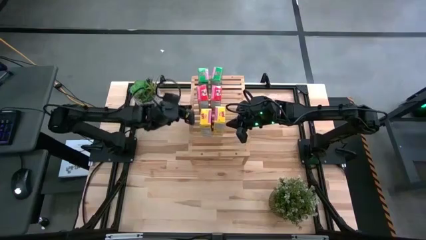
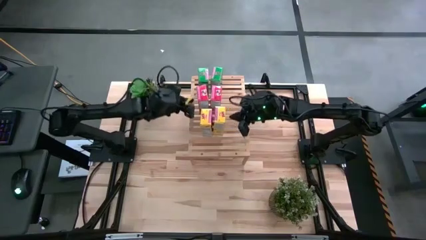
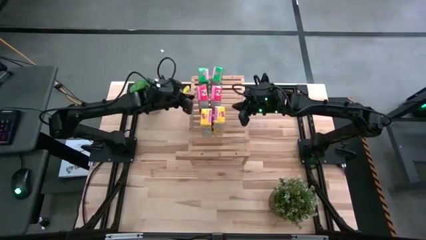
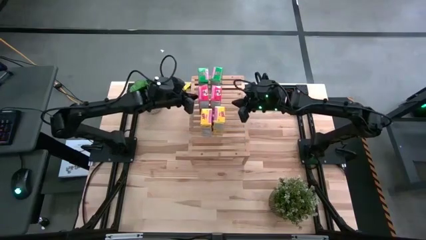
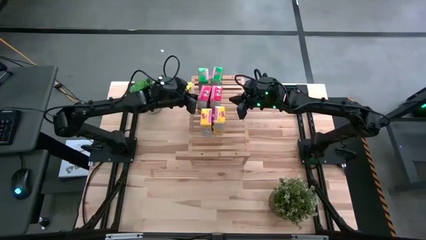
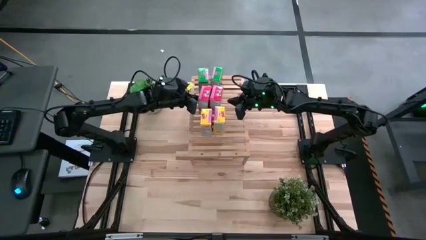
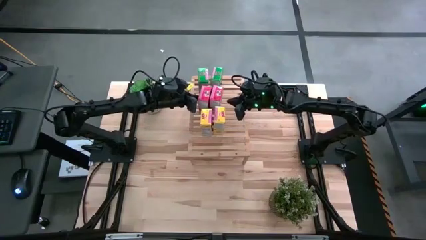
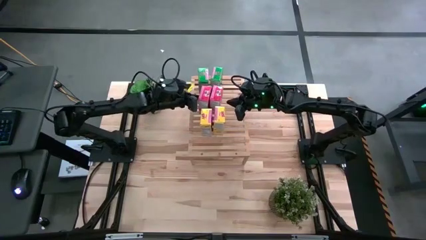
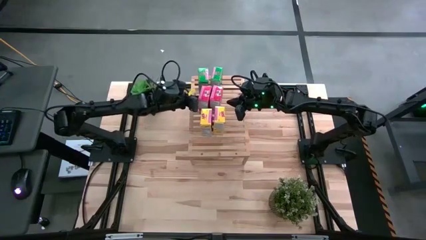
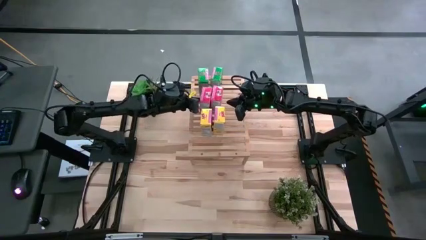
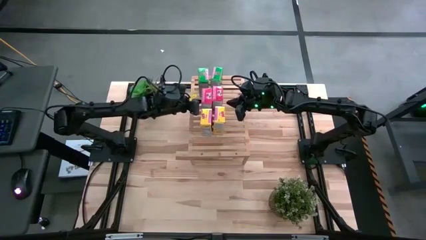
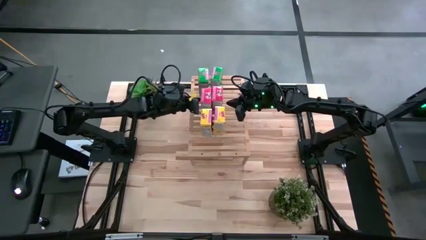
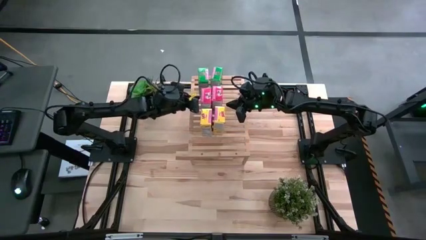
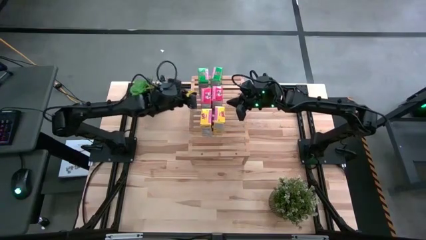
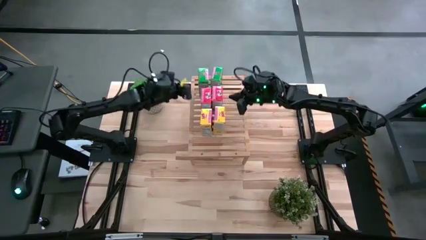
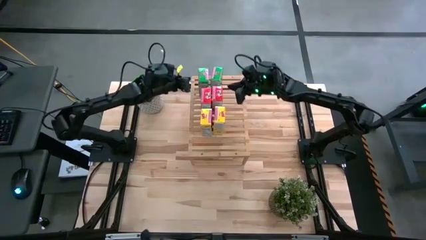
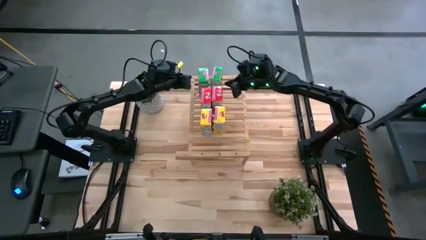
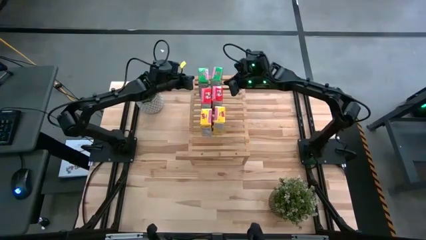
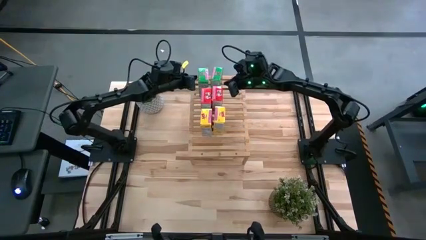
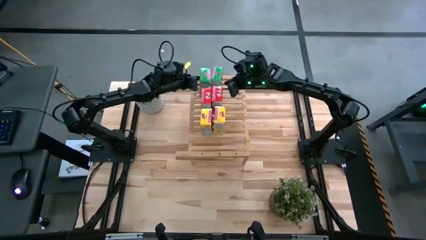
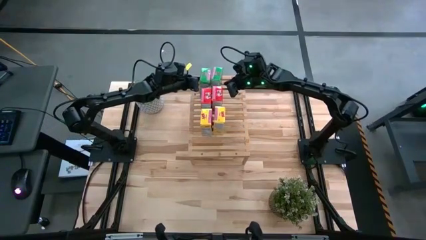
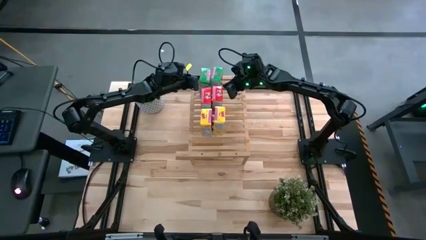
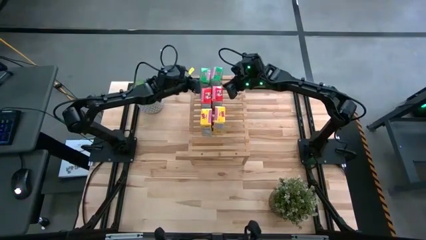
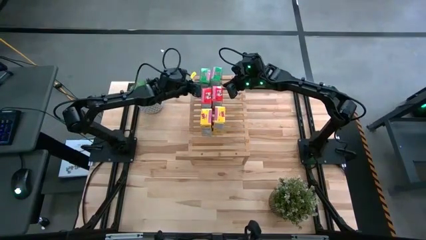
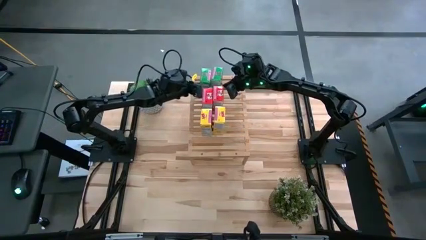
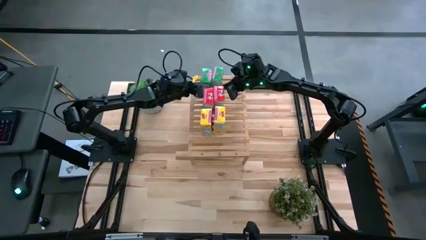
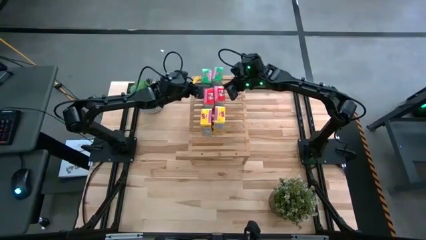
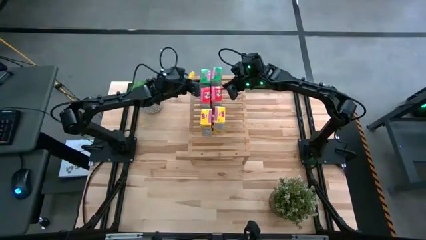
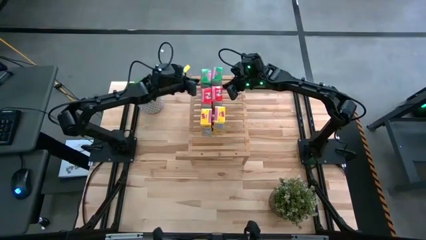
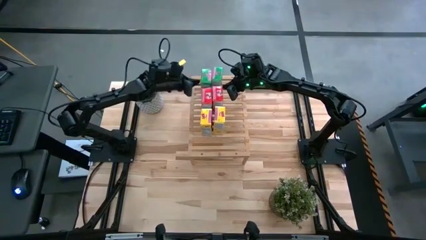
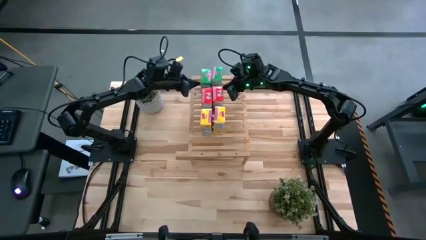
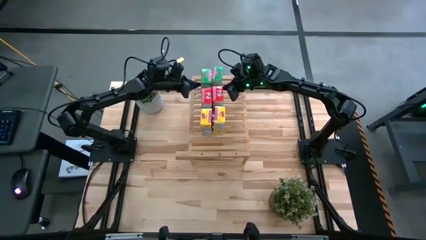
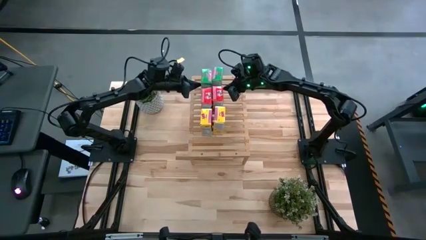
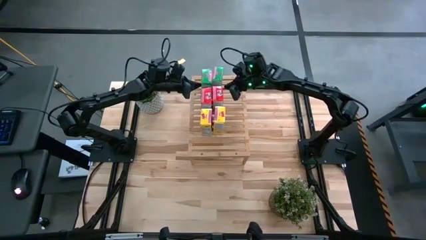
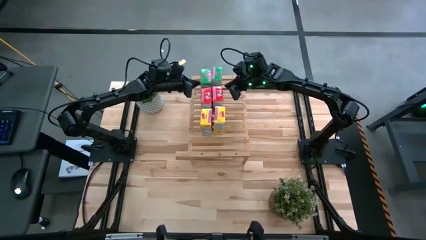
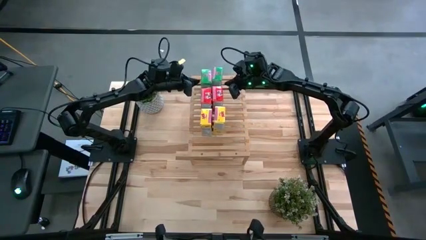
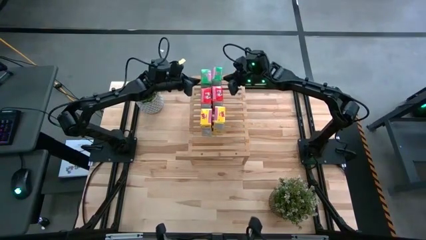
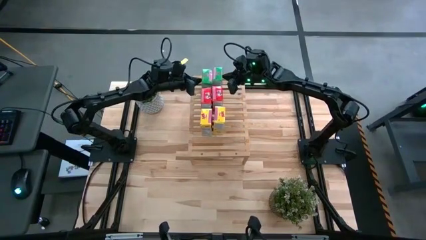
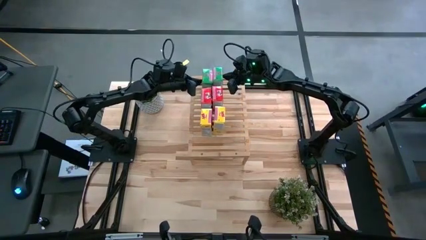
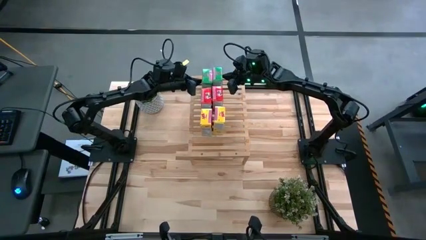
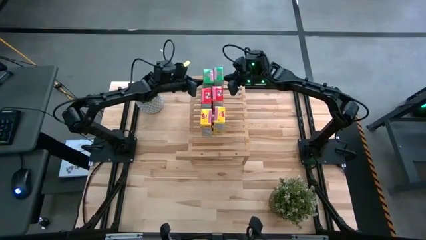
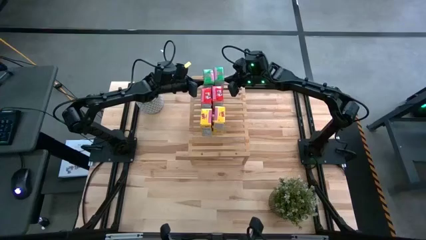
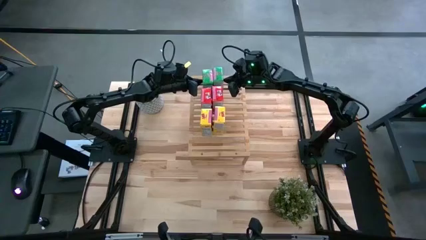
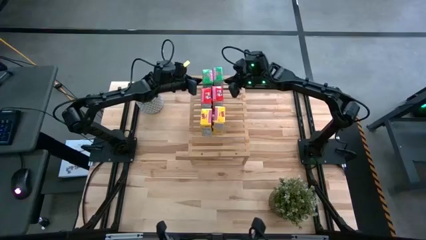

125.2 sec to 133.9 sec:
Task: Stack cereal on shelf
Adjust the cereal boxes on the shelf

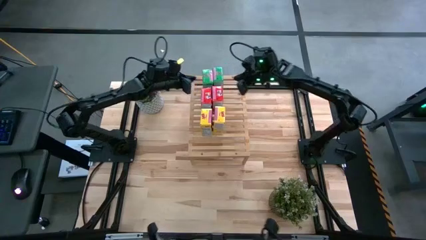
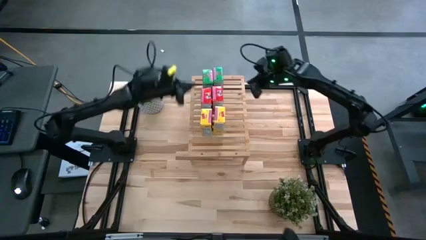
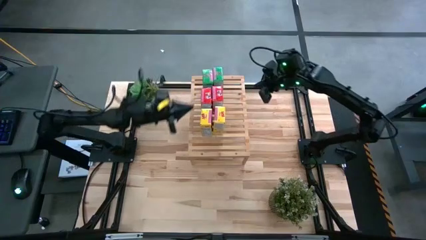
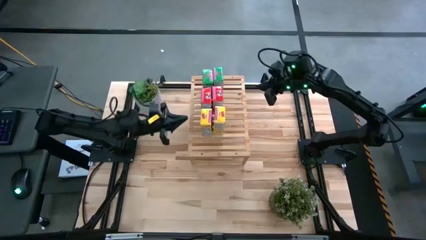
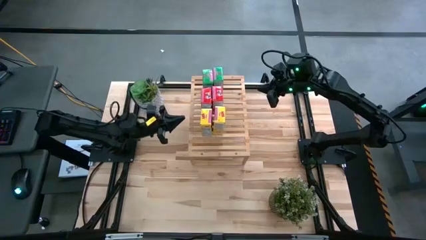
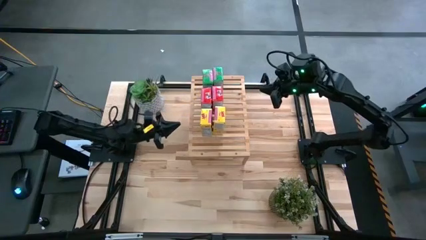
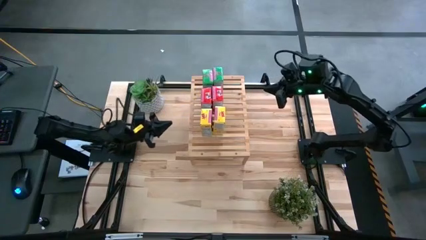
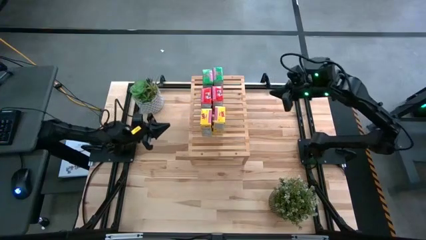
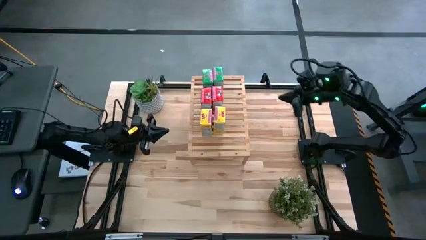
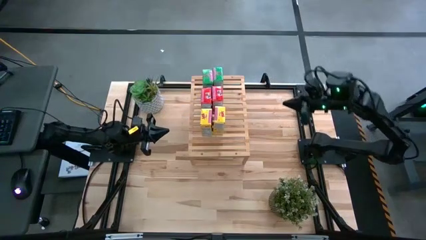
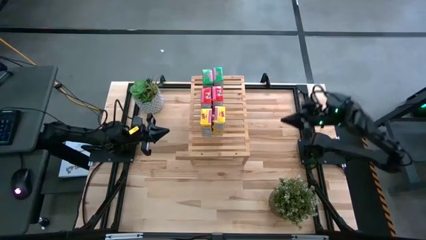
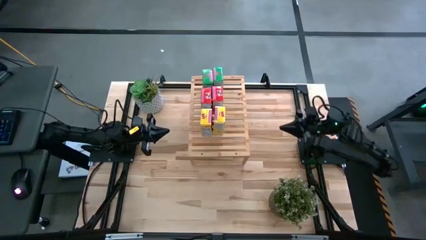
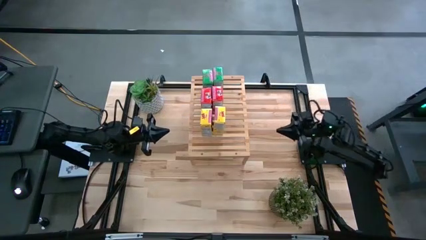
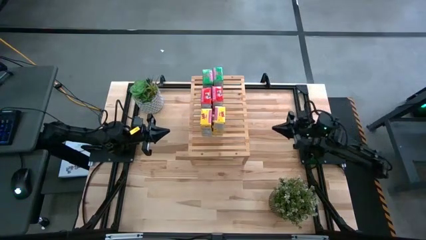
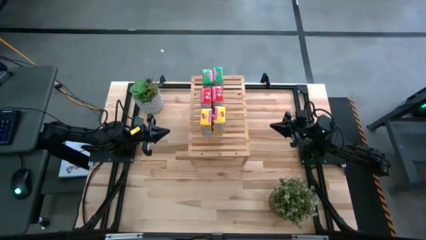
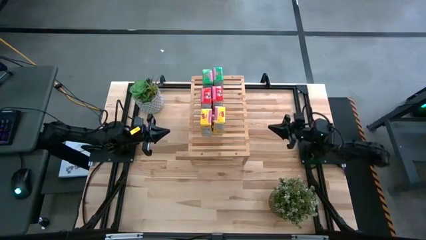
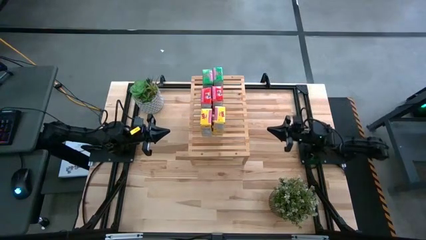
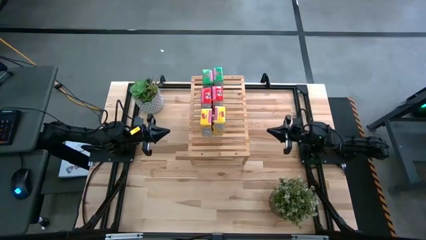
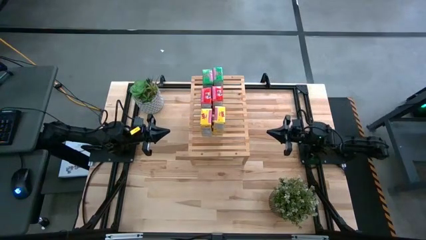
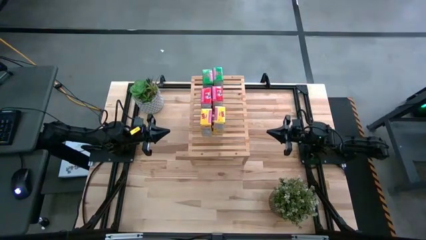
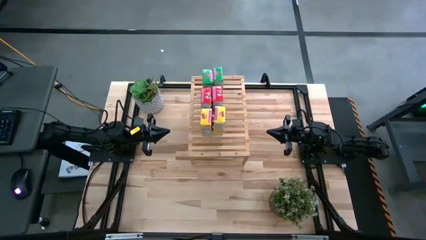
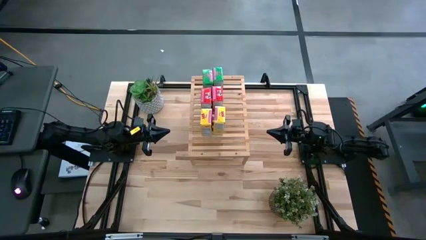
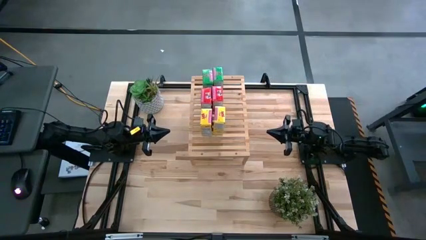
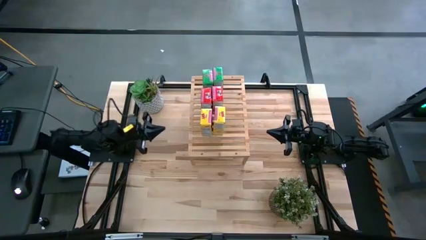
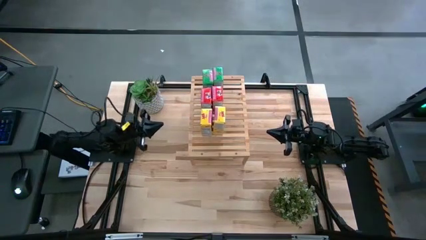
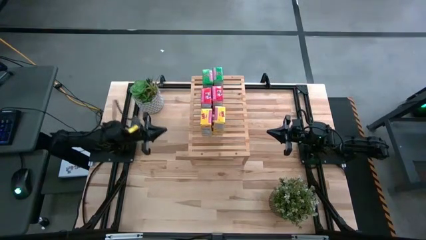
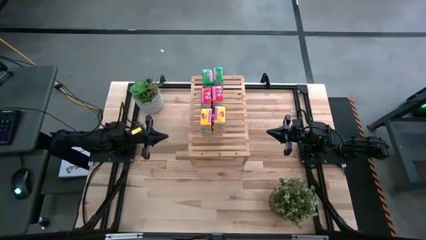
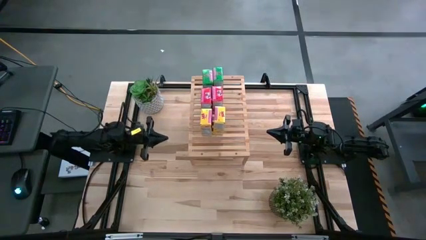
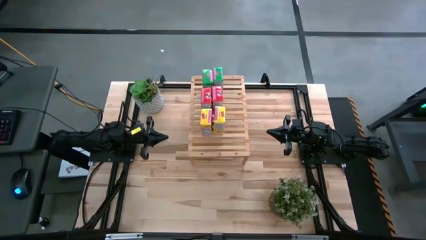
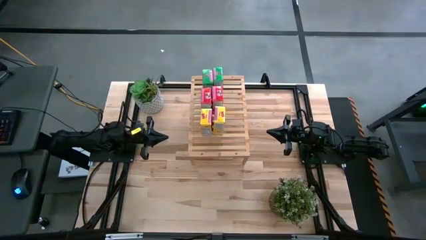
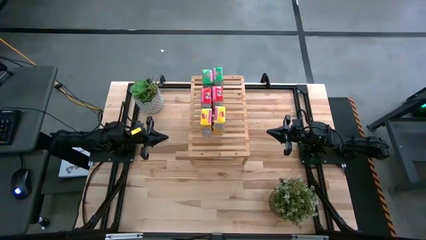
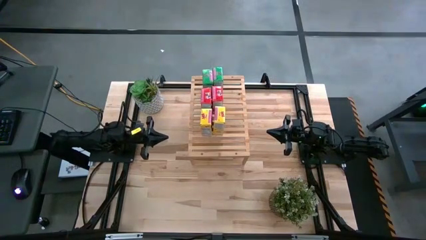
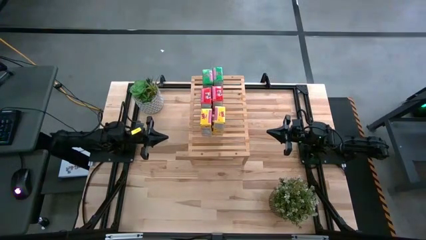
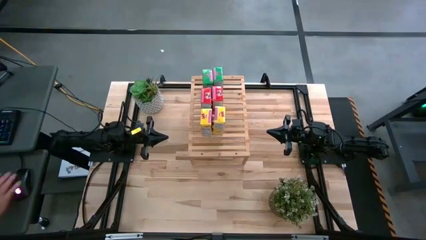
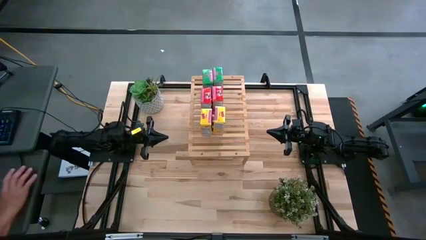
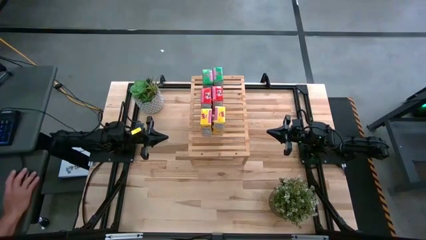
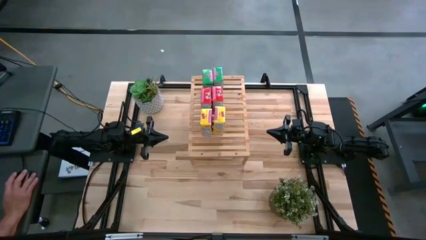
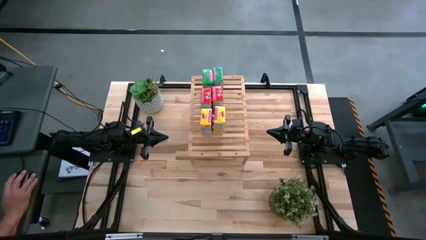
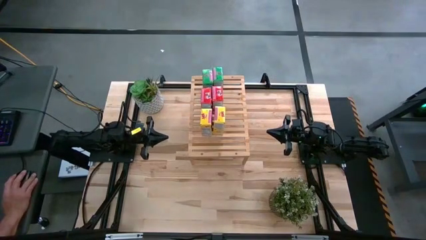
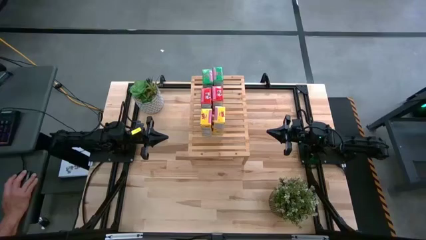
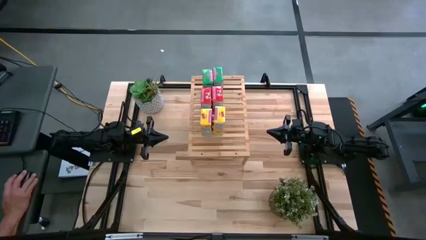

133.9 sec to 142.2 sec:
Return to Home Position
